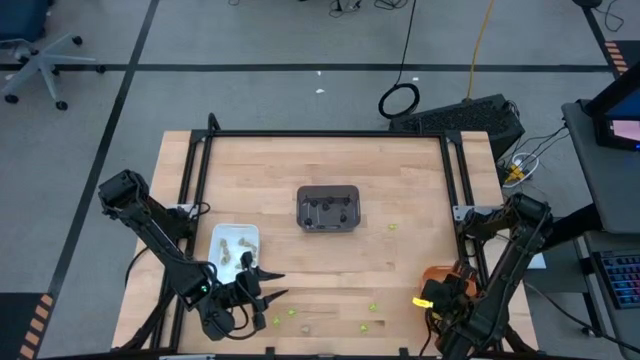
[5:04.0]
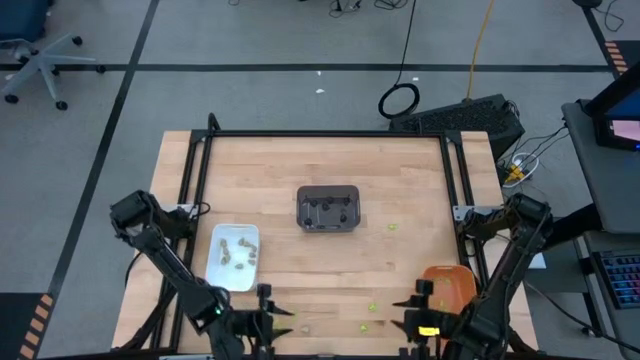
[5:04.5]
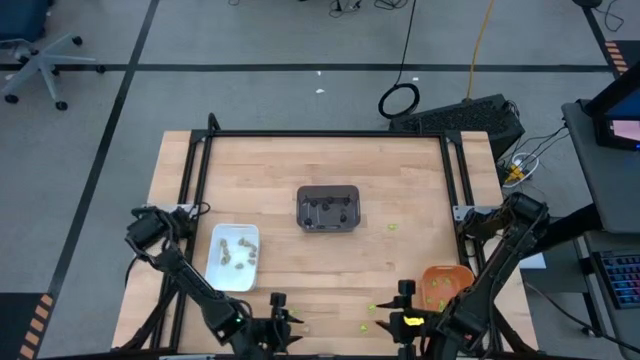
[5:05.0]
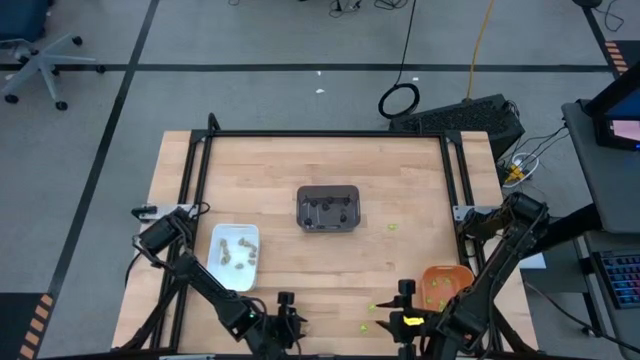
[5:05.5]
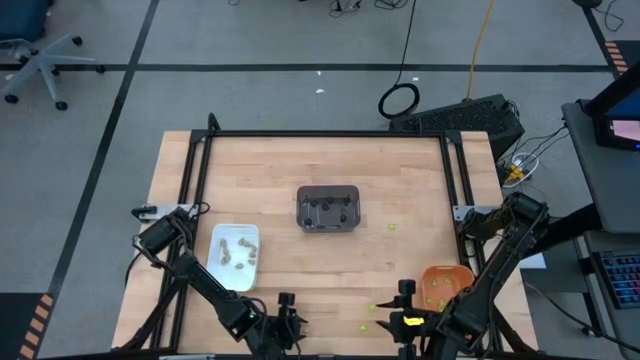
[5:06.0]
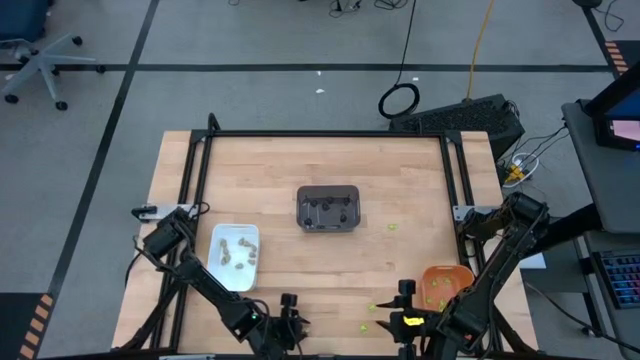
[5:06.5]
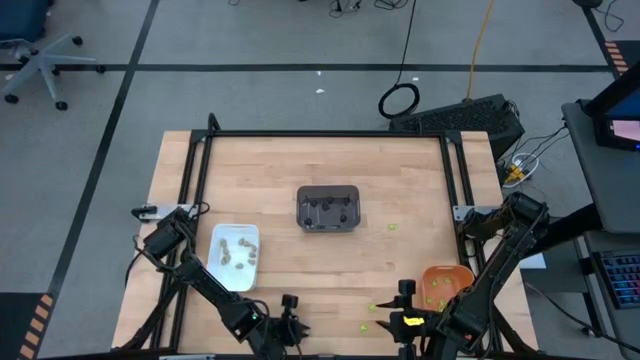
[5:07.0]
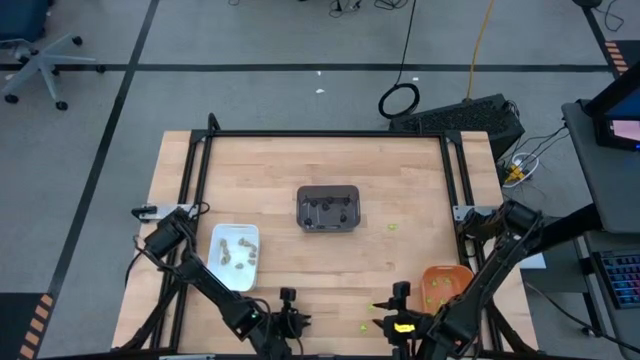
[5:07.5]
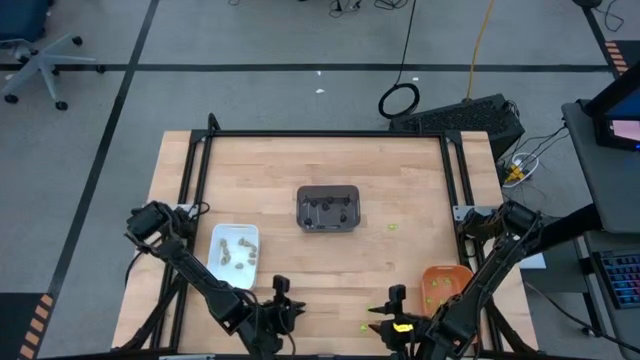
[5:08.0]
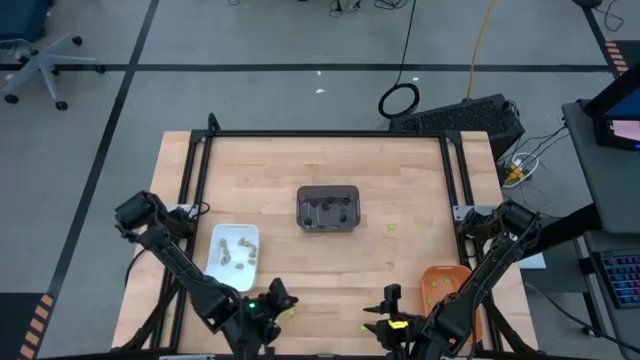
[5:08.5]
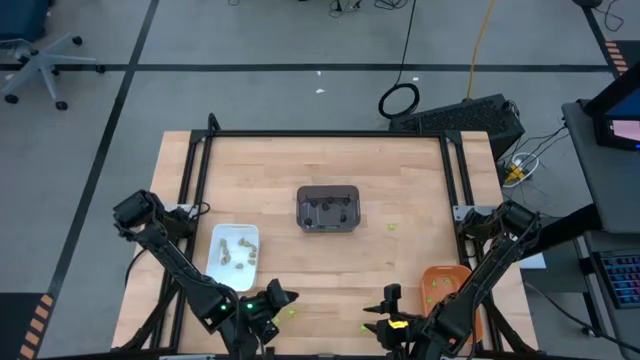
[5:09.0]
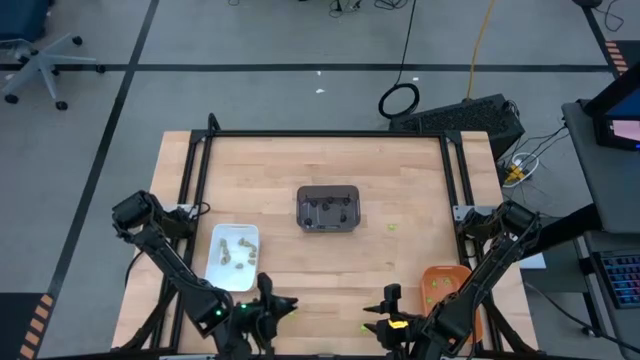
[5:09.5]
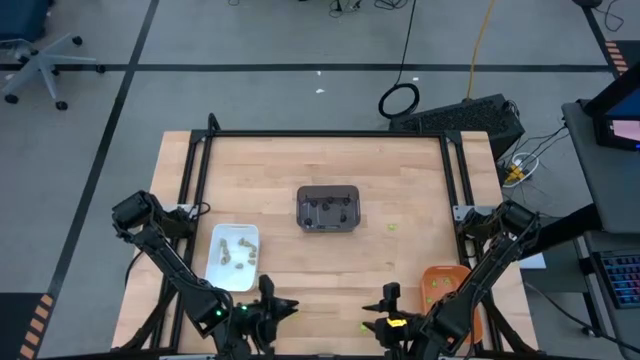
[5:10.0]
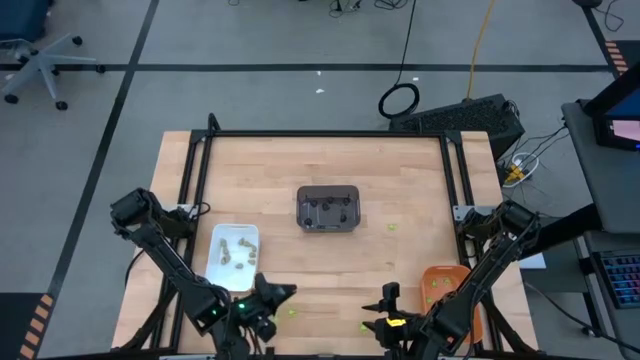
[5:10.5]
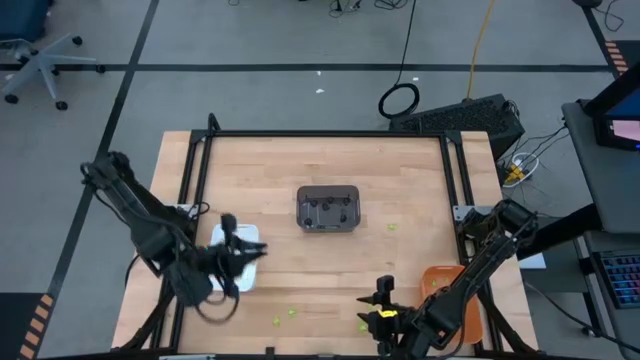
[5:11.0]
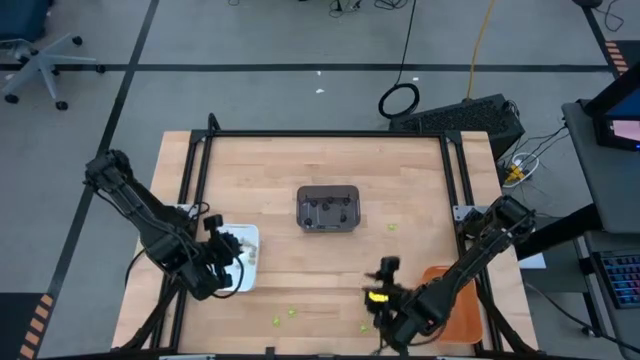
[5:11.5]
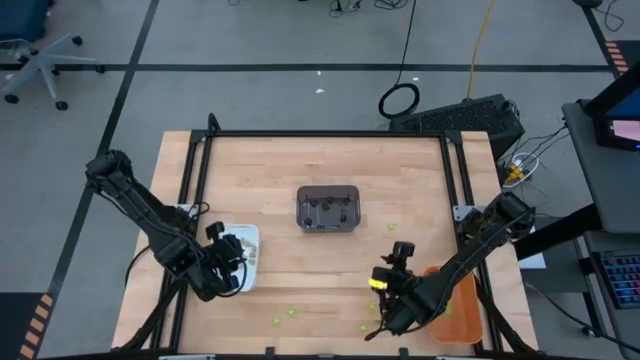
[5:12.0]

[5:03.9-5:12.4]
Task: Sort Halloween decoration
Put the white skull toy into the white bin

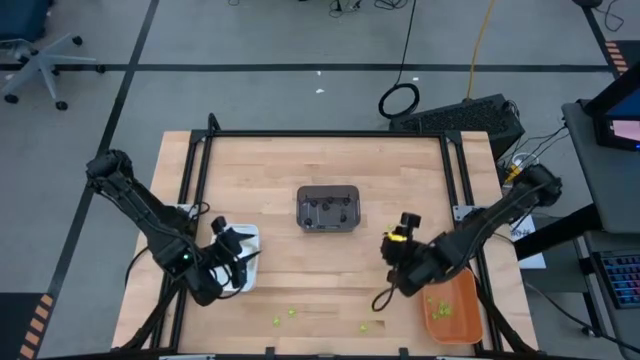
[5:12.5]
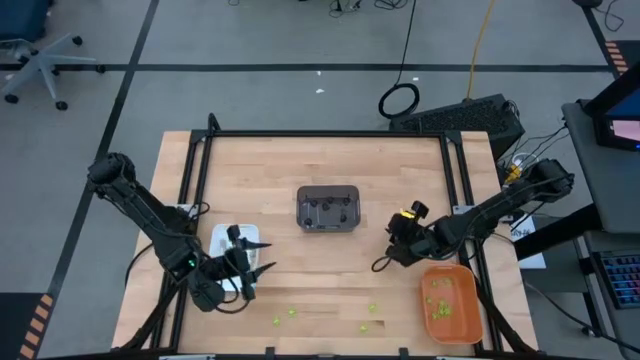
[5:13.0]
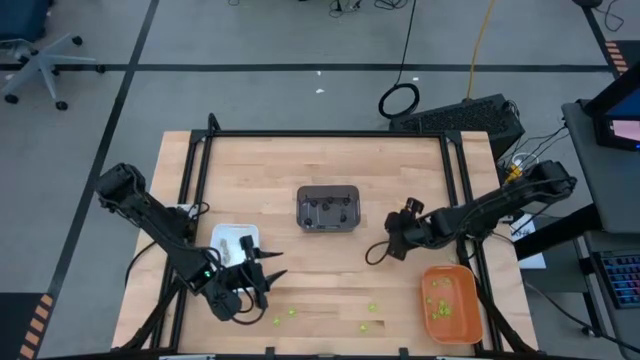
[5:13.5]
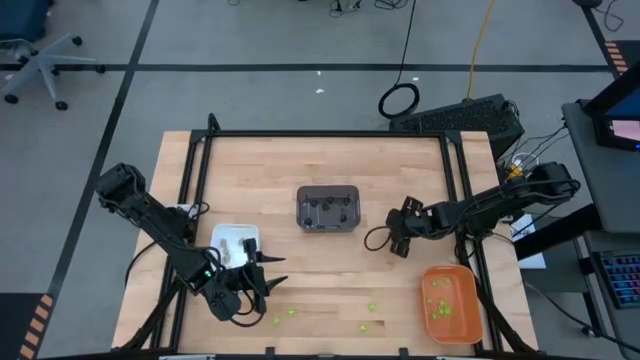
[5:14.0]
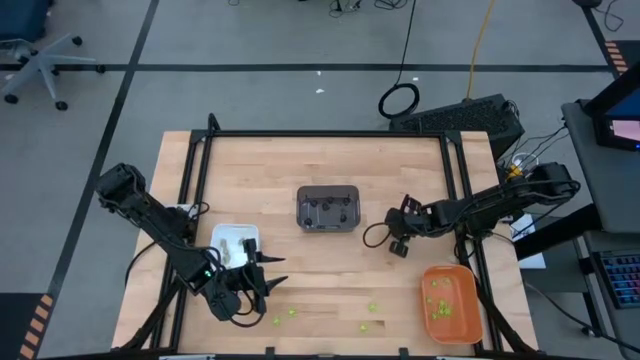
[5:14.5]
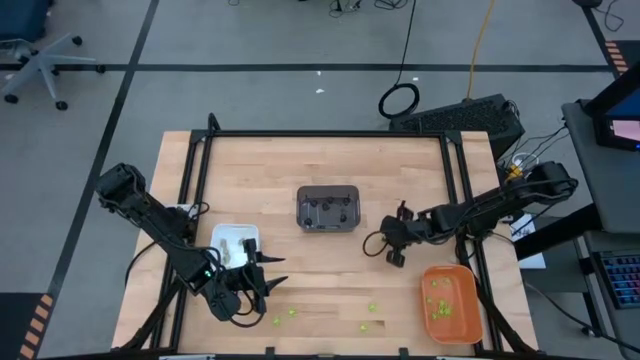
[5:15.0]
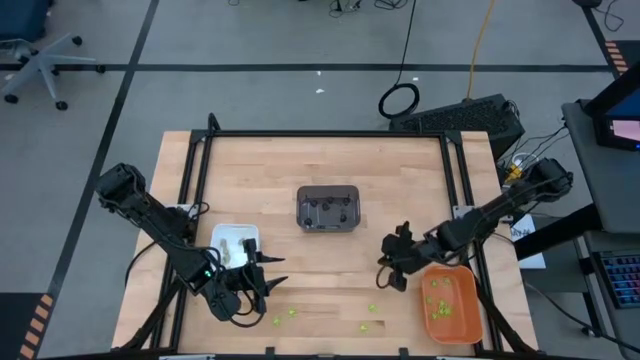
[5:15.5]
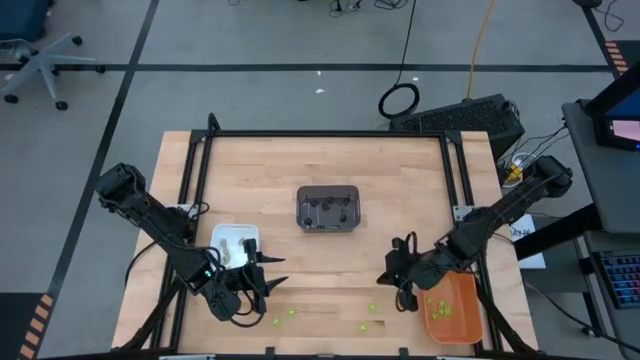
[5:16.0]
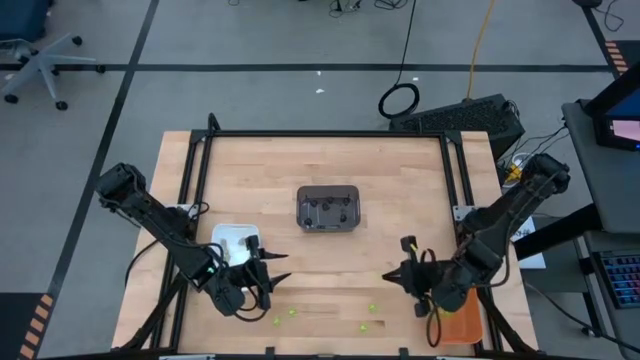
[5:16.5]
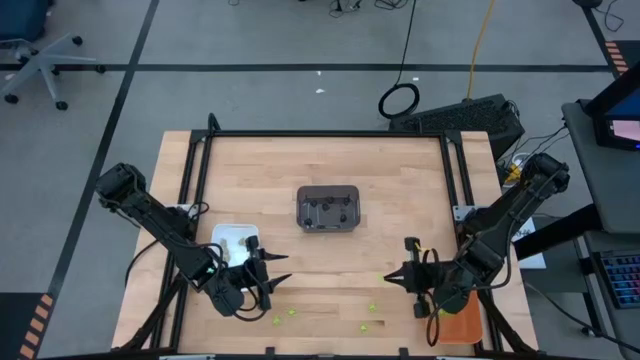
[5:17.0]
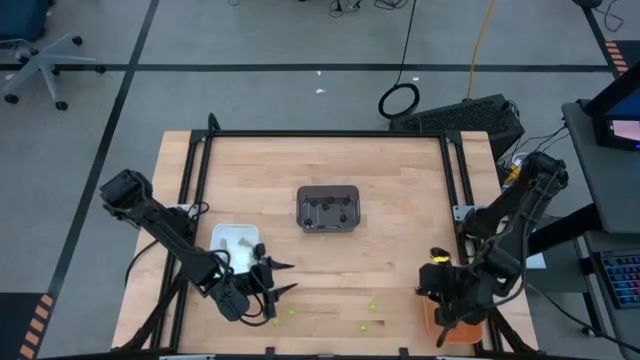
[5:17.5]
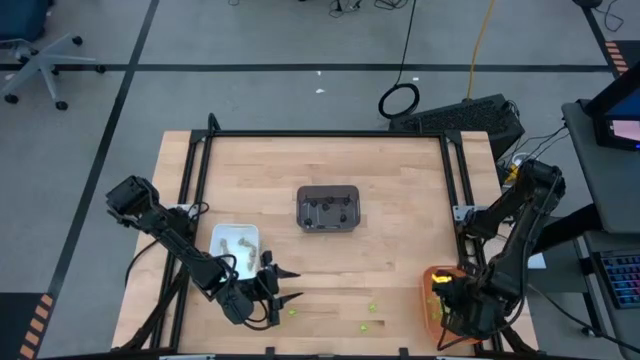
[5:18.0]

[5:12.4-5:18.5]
Put the green spider toy into the orange bin

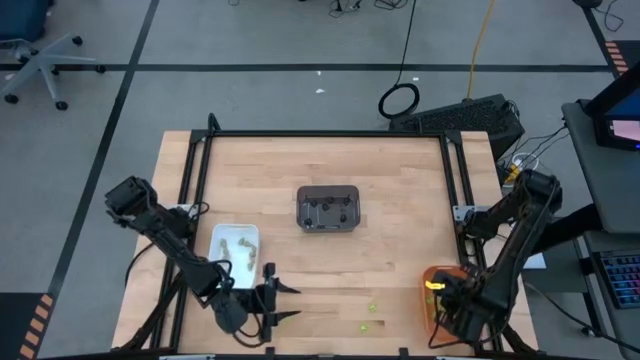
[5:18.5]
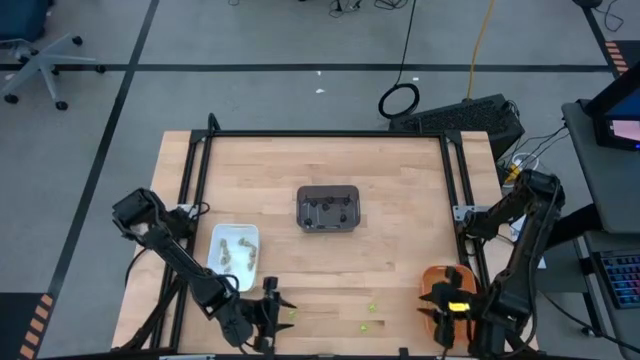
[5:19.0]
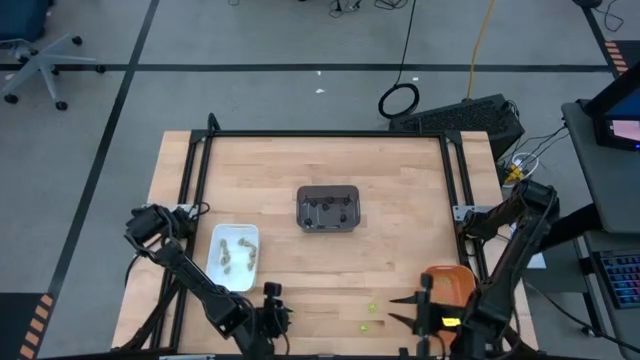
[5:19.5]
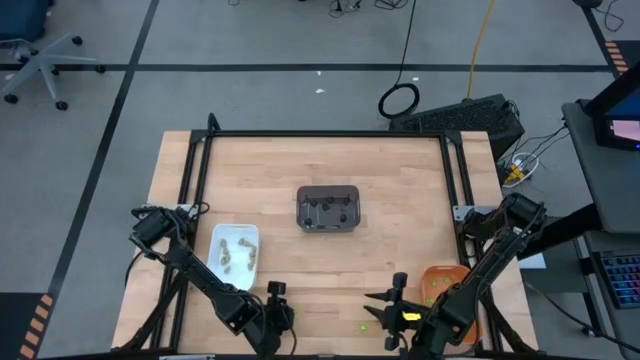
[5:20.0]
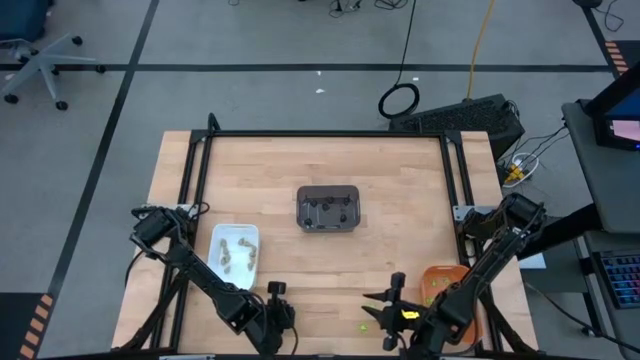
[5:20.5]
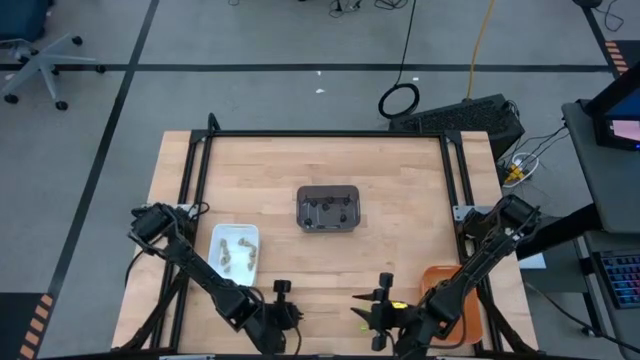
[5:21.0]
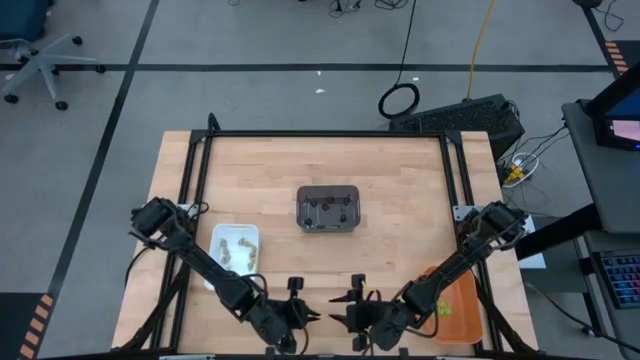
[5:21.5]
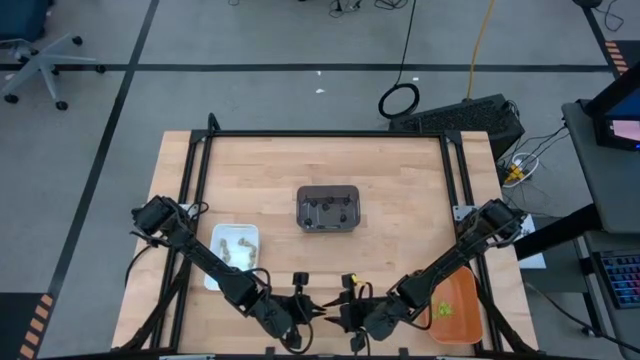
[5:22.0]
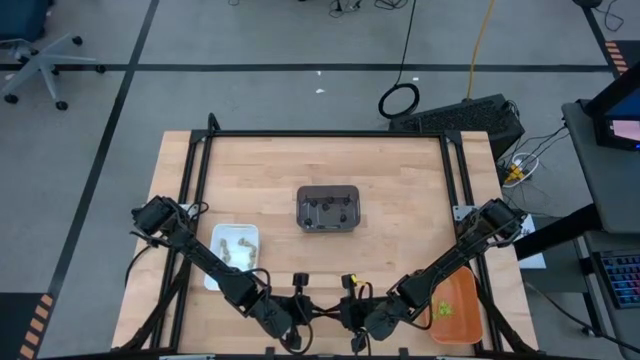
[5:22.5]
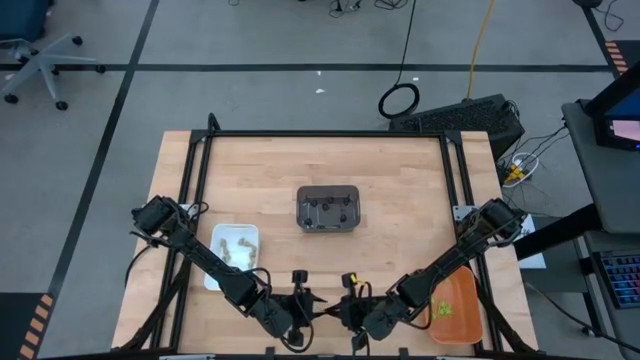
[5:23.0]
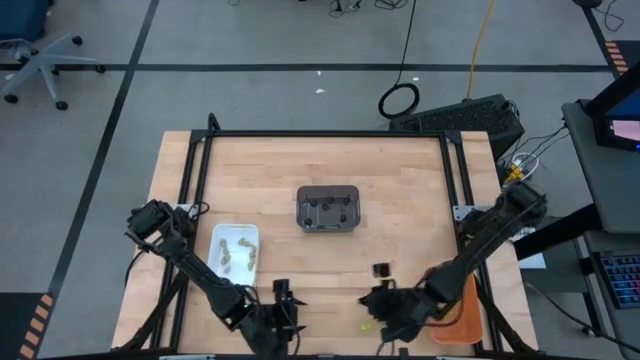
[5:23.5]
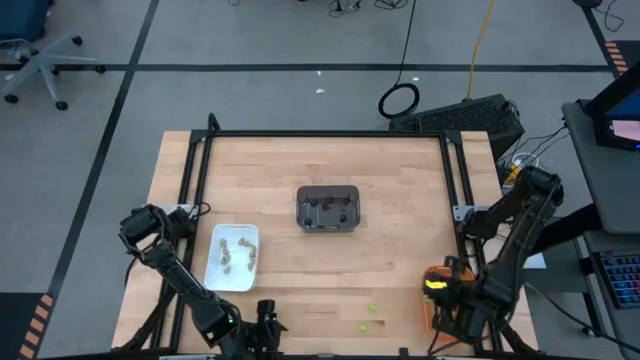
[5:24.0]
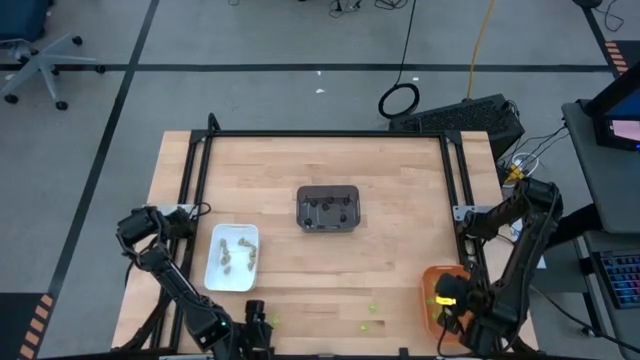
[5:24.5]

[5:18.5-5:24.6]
Put the green spider toy into the orange bin

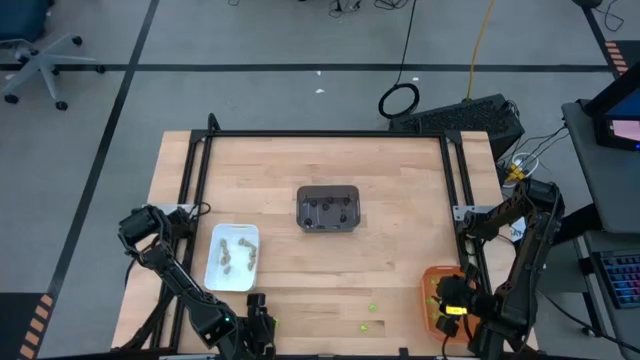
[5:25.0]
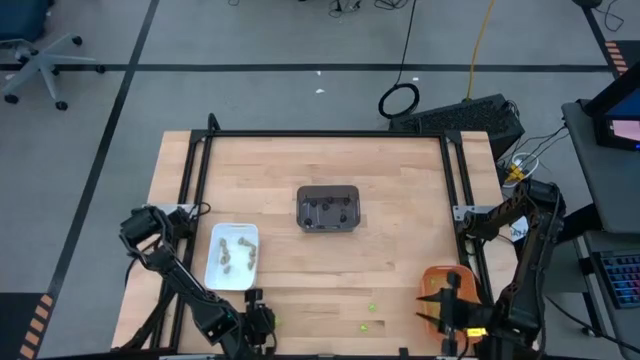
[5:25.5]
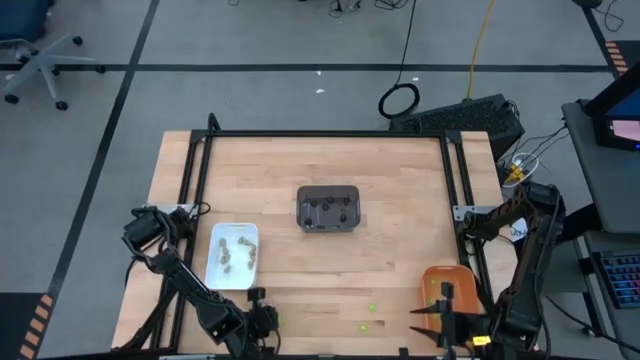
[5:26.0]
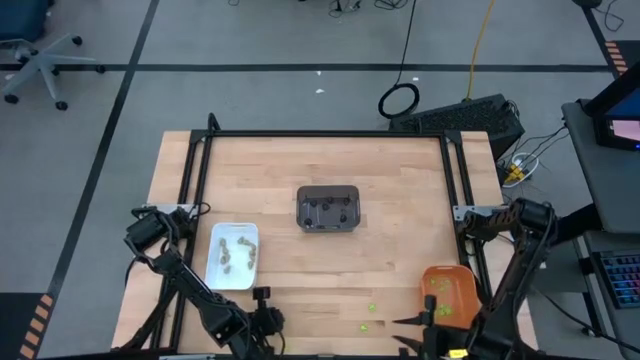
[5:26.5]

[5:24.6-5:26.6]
Put the green spider toy into the orange bin
